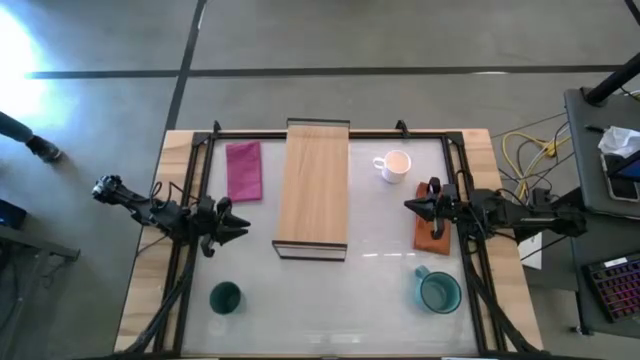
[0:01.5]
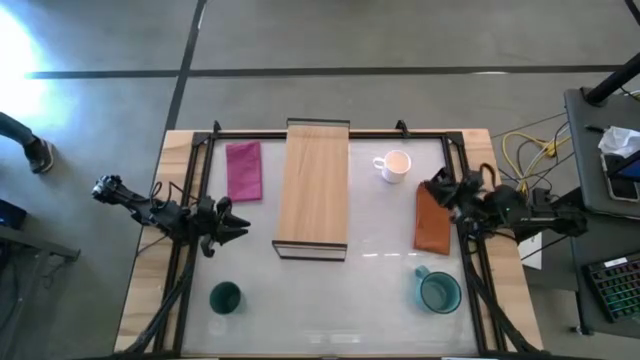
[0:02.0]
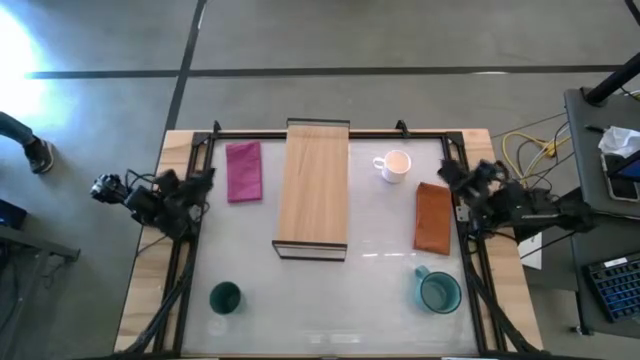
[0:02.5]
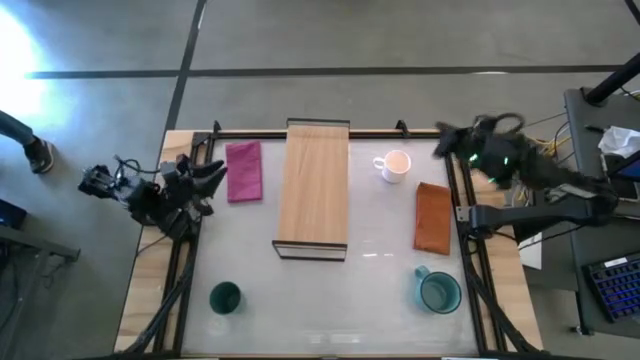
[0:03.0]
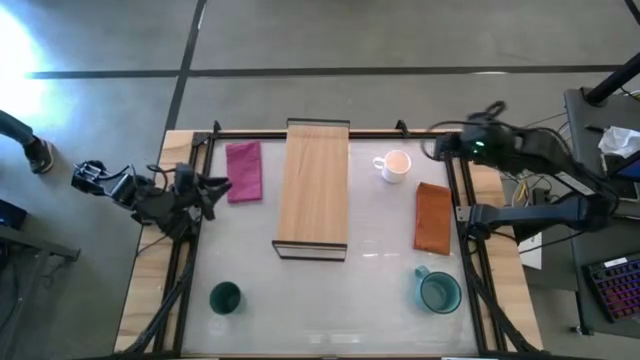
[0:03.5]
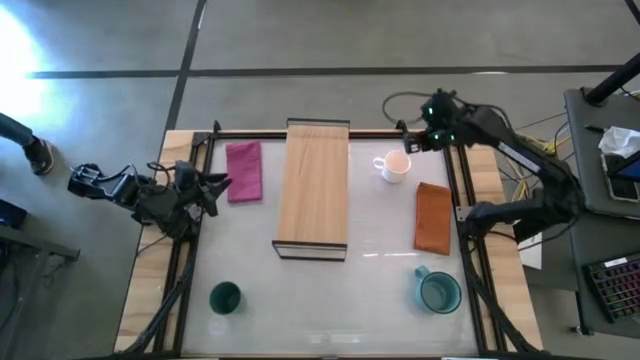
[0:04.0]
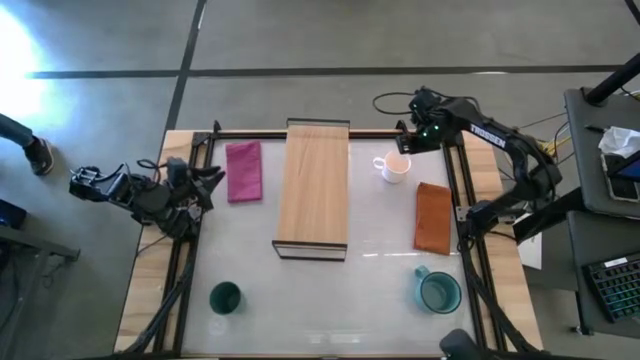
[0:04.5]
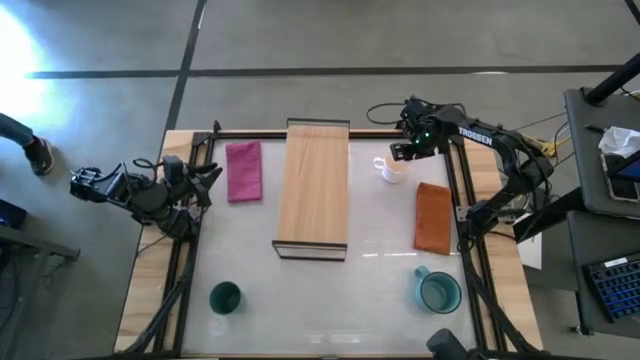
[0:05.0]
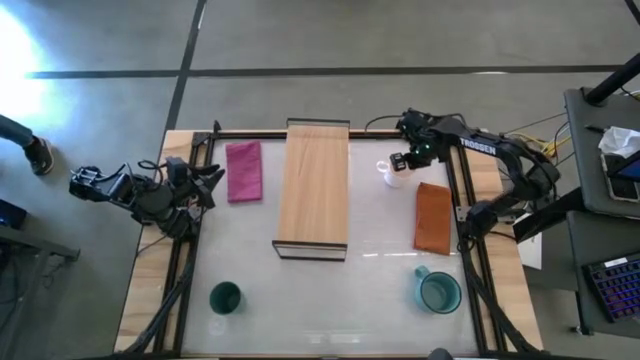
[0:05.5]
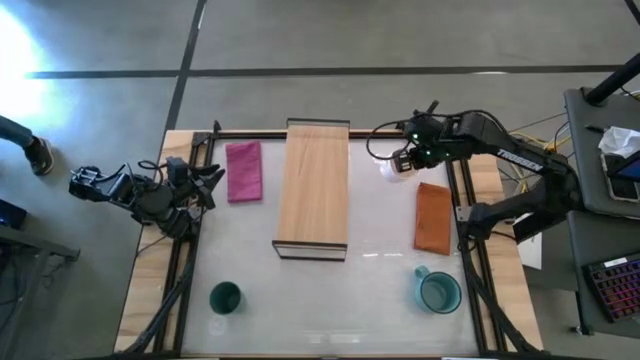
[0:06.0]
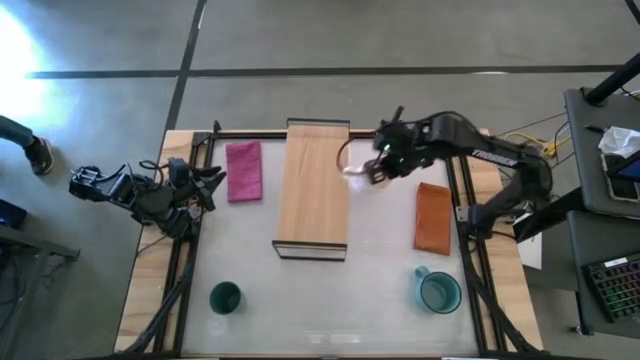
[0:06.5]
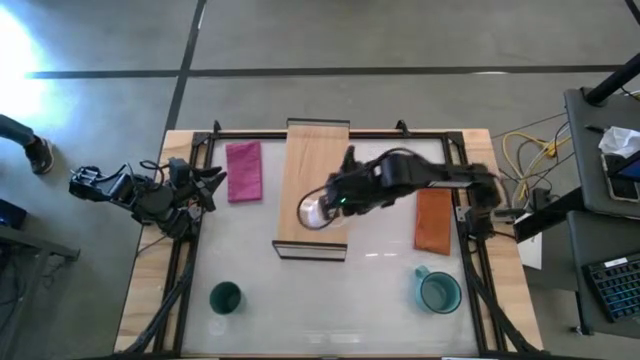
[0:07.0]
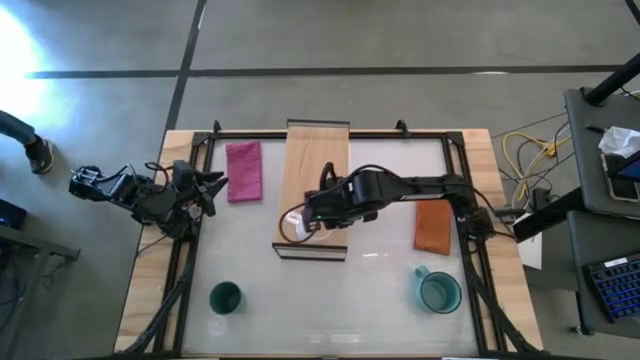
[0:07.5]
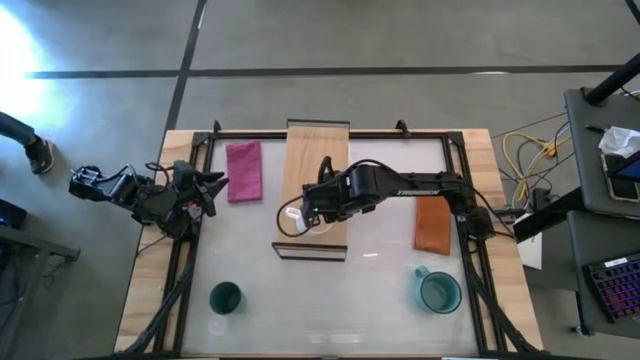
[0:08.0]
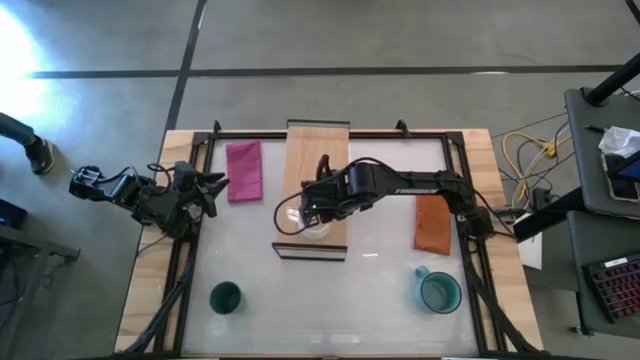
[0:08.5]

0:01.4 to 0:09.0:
Task: Stack small to large cups/mugs on shelf
Put the white mug on the shelf

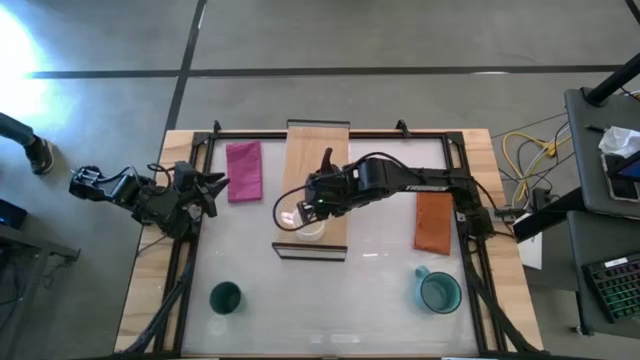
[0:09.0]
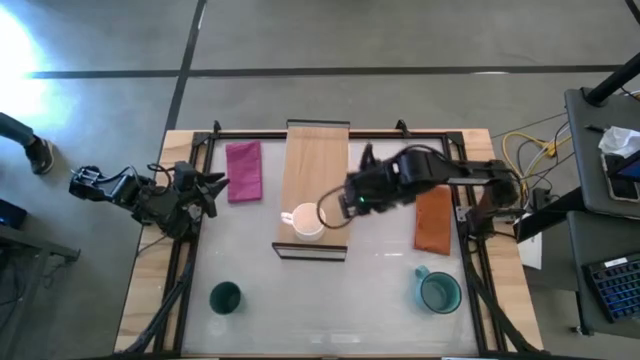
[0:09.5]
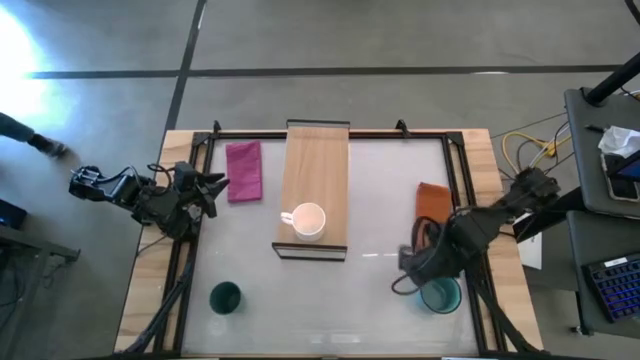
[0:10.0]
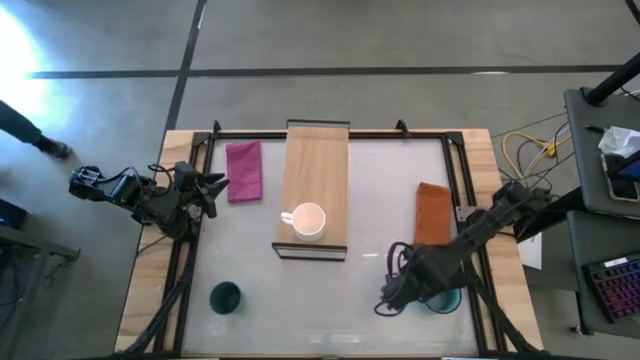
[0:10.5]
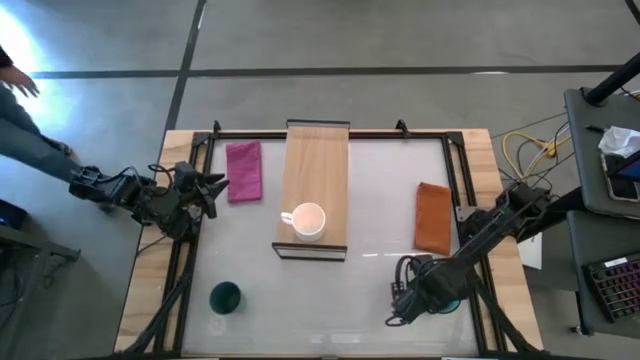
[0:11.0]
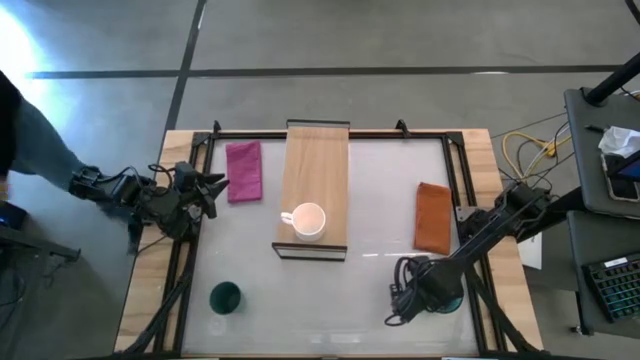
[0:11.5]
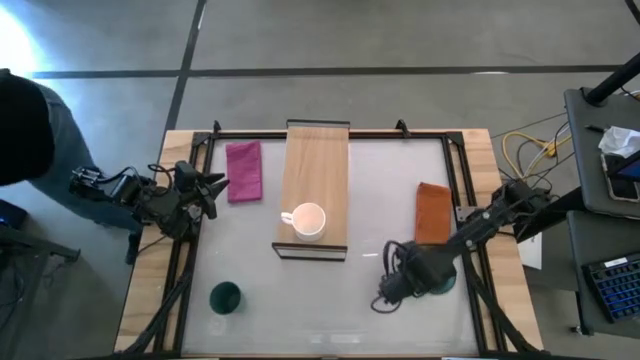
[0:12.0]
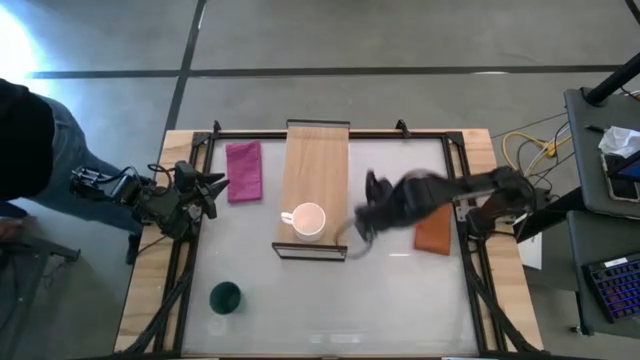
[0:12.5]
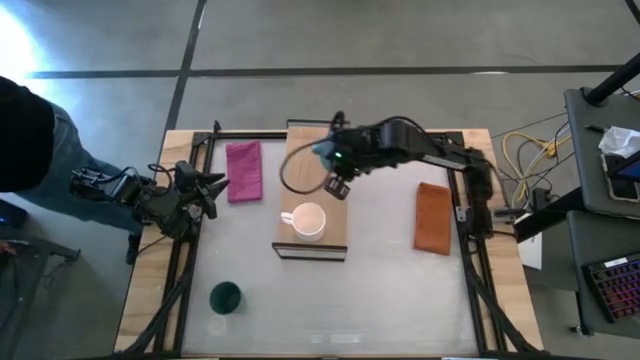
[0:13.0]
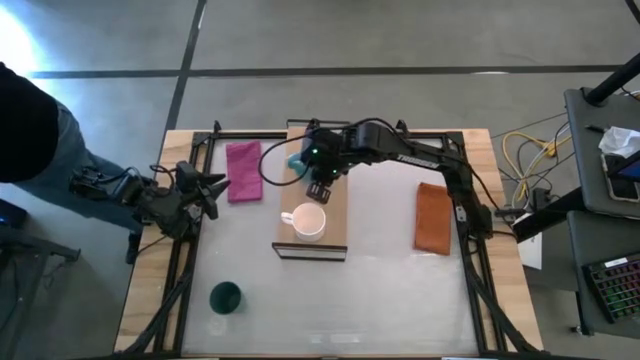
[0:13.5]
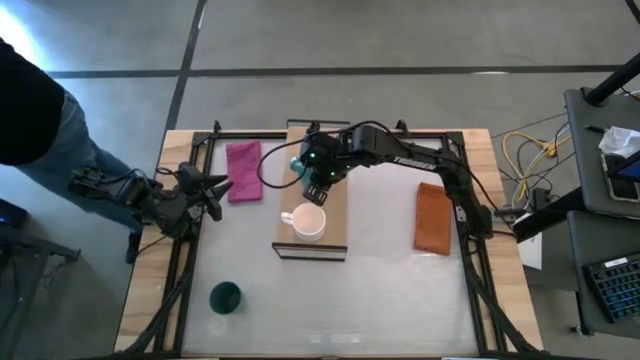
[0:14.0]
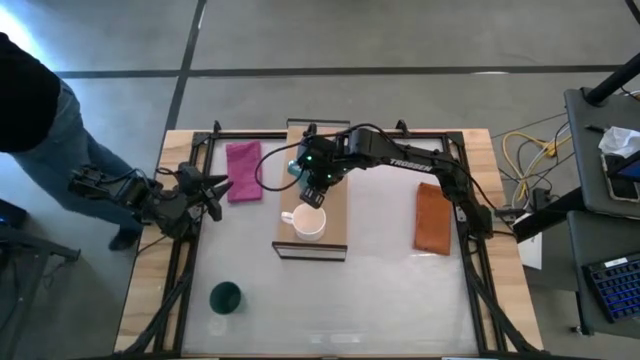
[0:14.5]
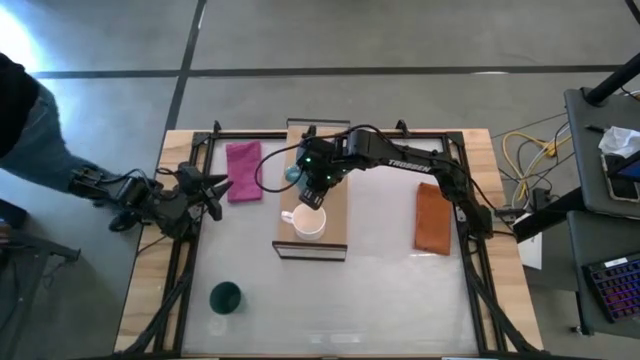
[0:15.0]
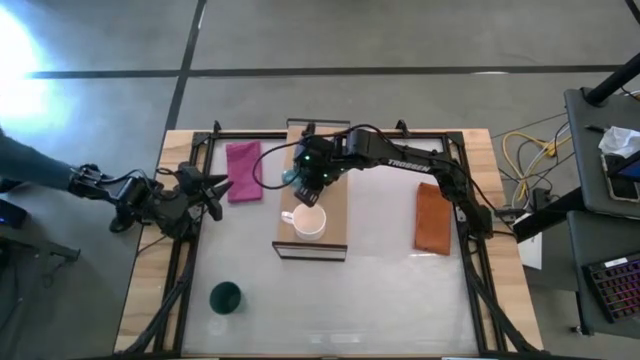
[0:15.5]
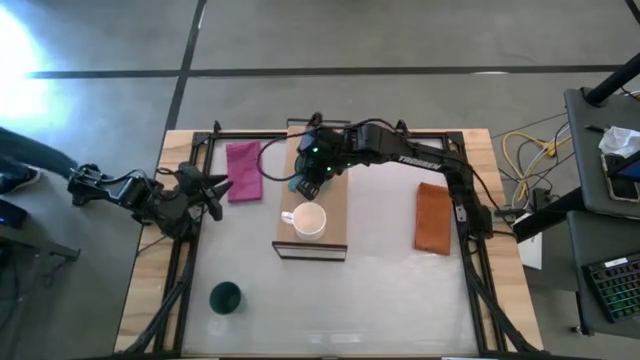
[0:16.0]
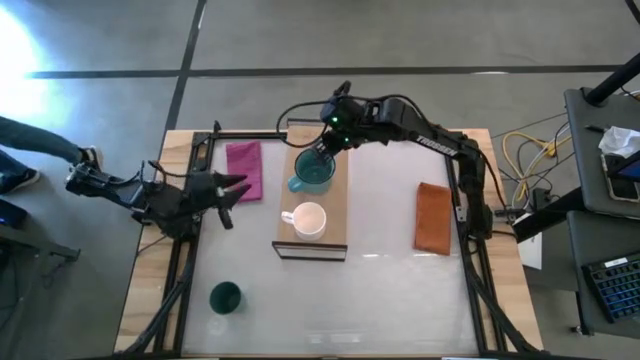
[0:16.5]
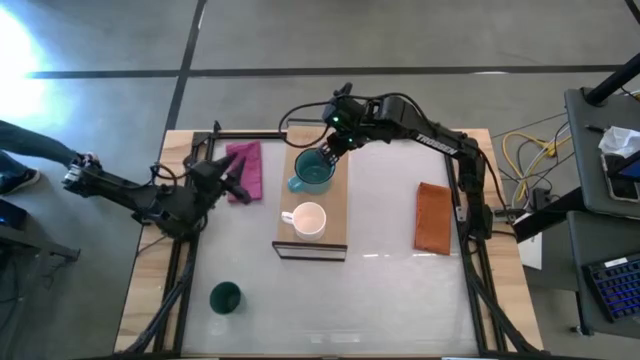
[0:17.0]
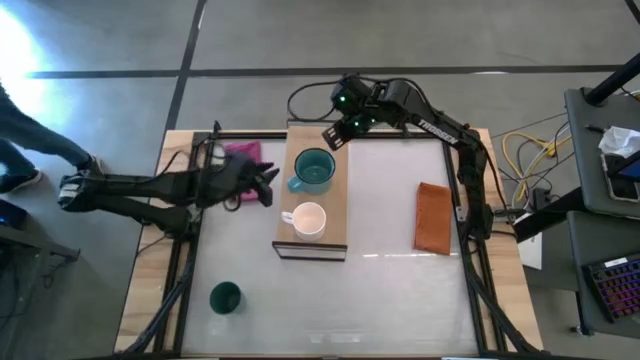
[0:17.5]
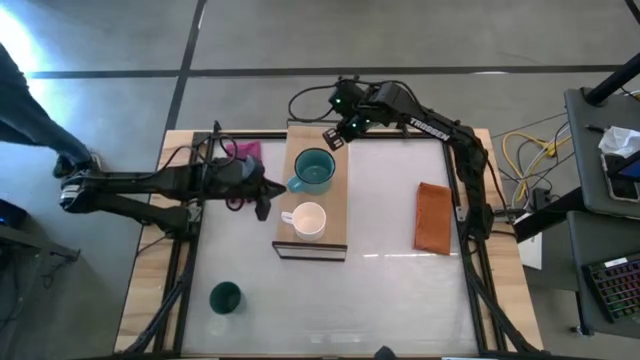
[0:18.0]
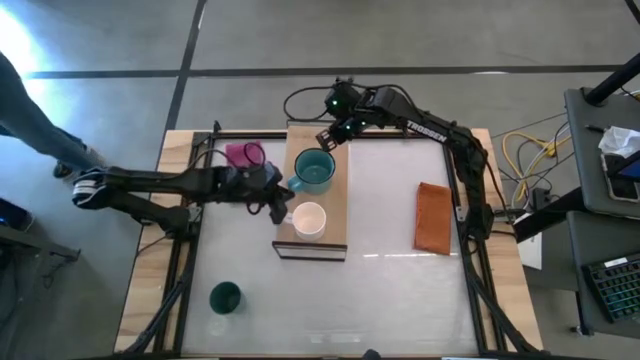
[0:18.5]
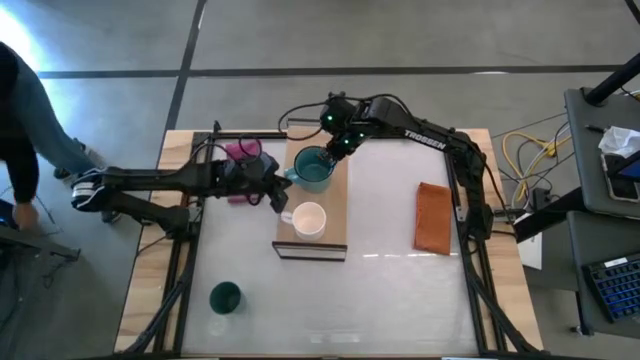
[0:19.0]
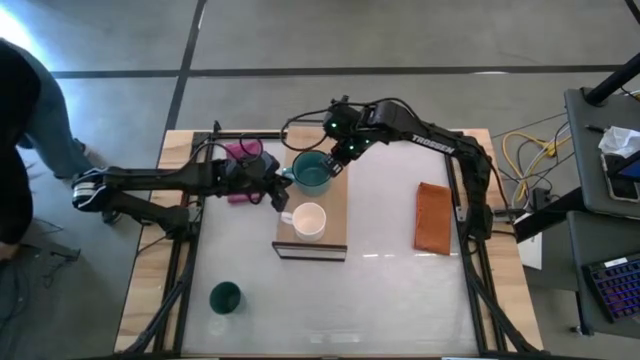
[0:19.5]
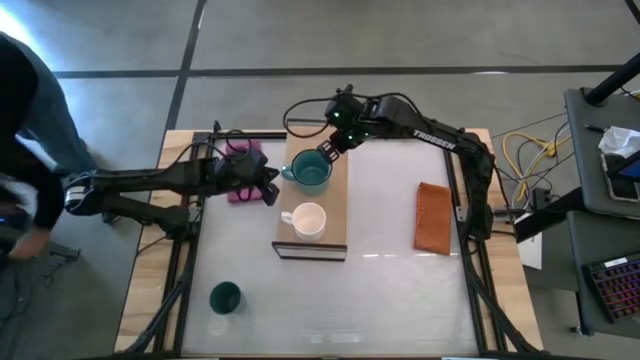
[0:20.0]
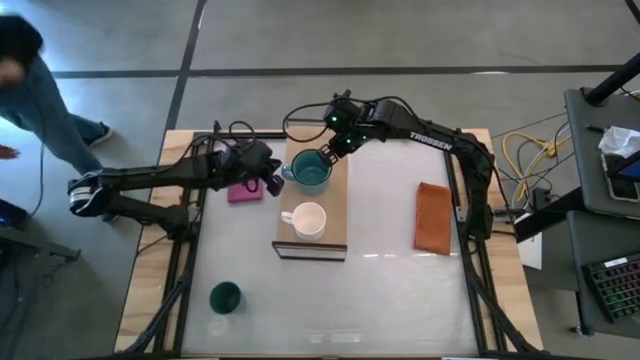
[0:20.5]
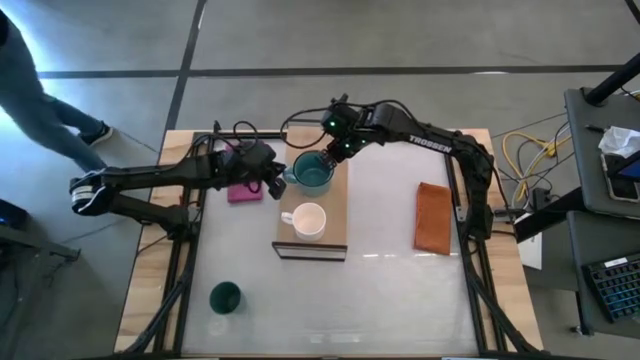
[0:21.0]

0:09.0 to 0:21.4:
Put the blue mug on the shelf

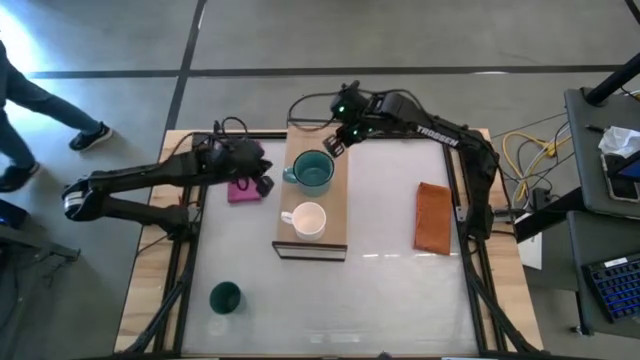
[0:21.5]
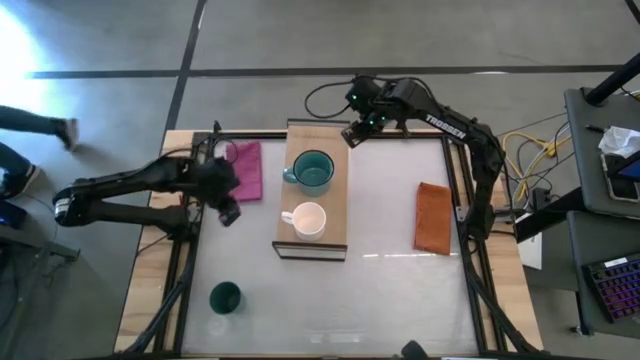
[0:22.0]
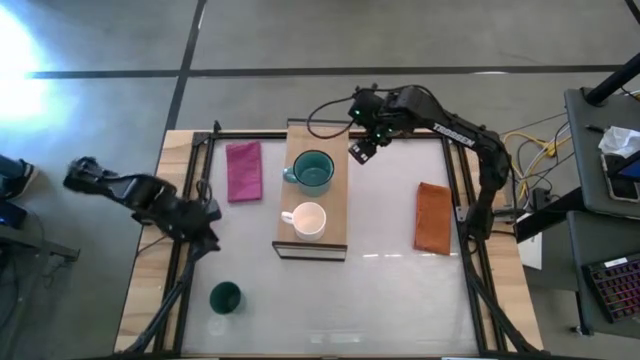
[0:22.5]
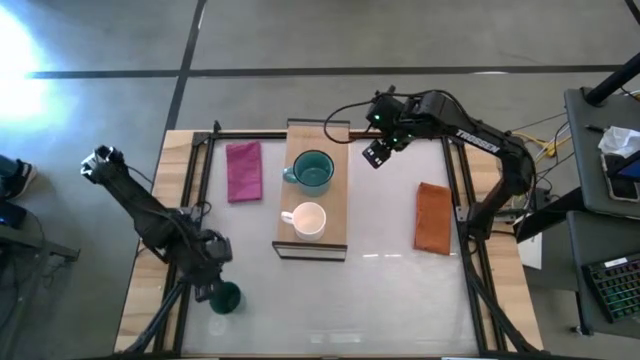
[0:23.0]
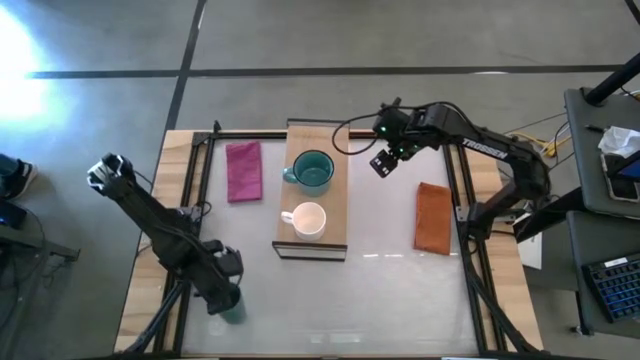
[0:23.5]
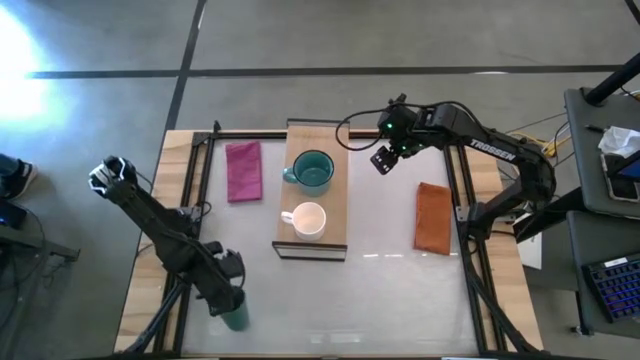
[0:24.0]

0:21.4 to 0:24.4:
Put the green cup on the shelf
